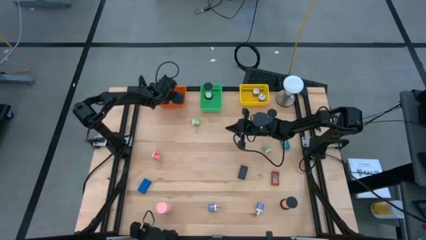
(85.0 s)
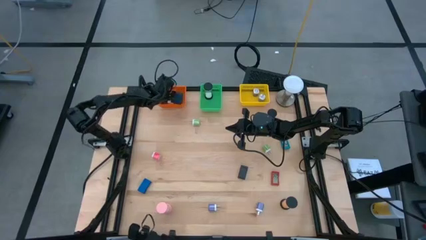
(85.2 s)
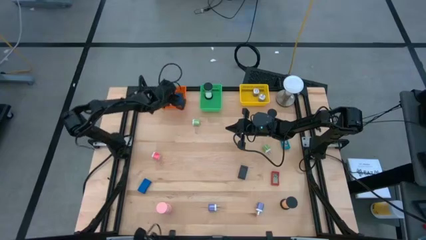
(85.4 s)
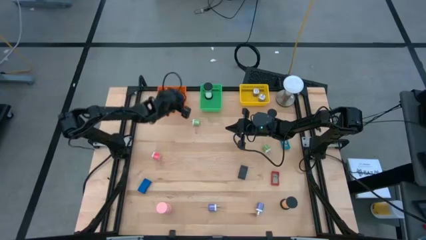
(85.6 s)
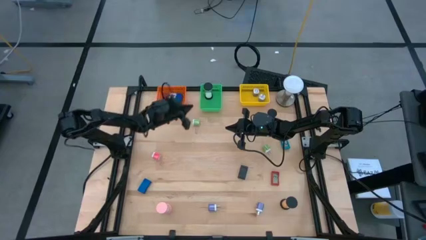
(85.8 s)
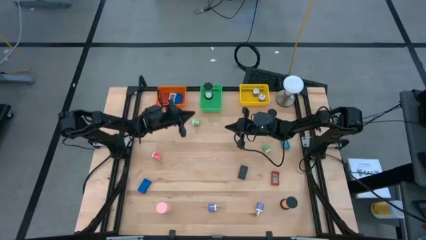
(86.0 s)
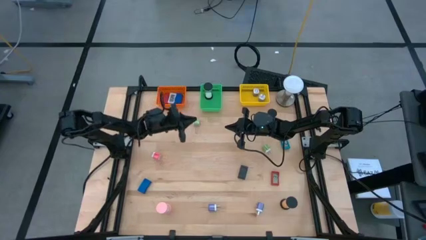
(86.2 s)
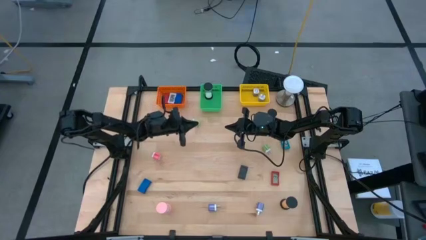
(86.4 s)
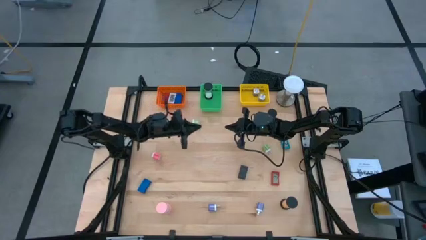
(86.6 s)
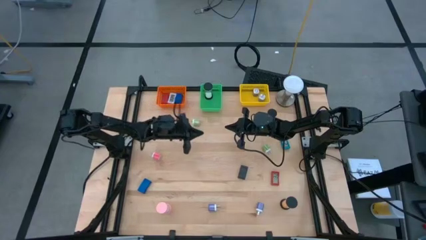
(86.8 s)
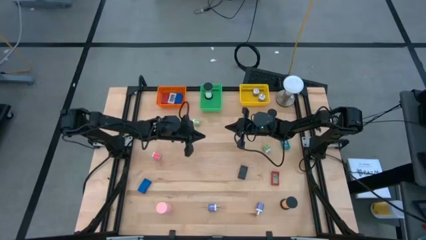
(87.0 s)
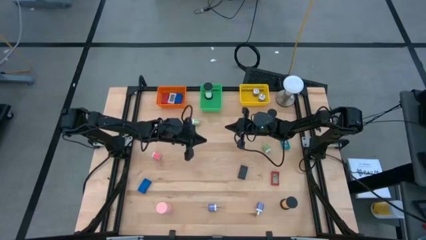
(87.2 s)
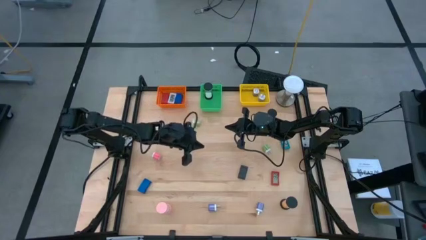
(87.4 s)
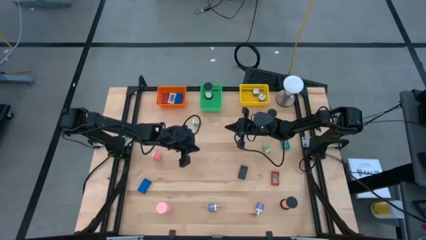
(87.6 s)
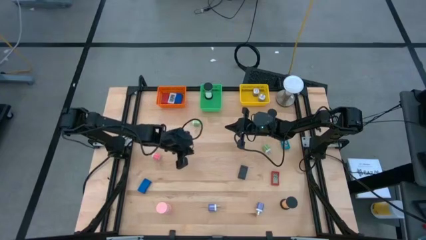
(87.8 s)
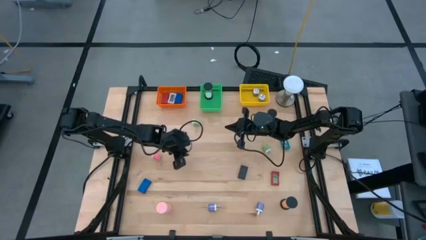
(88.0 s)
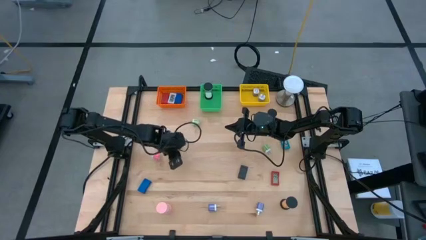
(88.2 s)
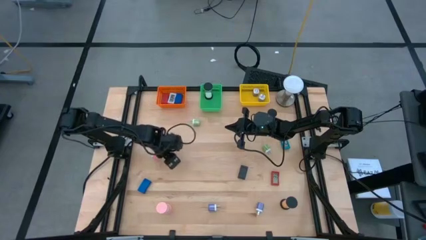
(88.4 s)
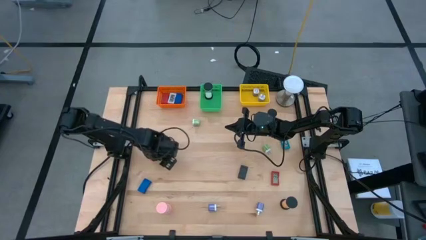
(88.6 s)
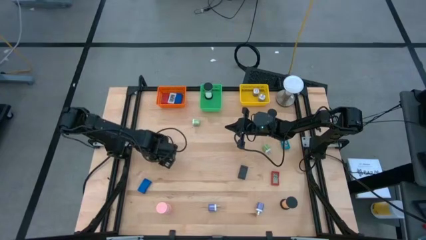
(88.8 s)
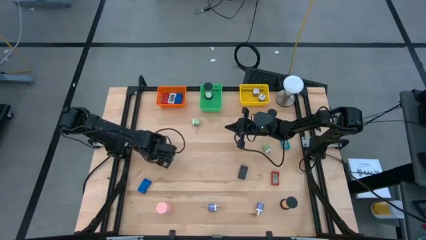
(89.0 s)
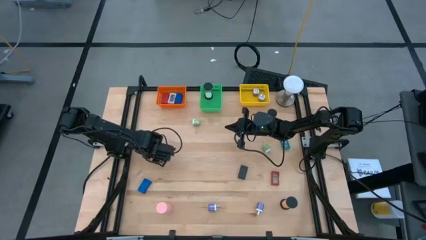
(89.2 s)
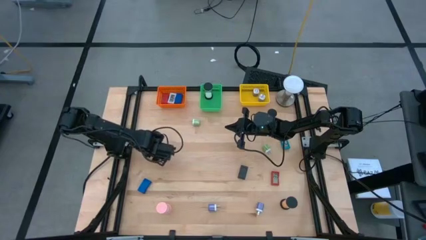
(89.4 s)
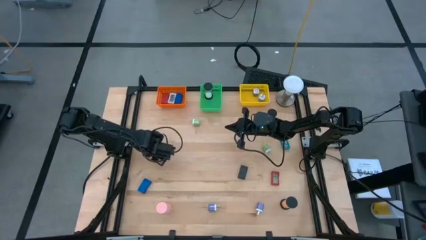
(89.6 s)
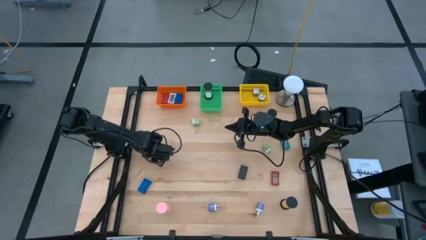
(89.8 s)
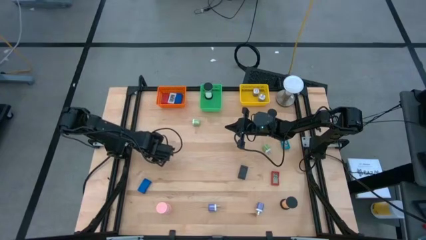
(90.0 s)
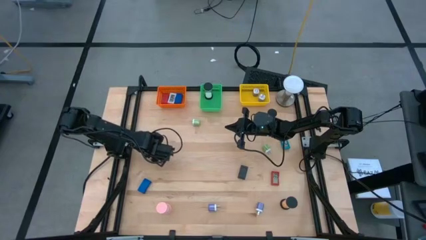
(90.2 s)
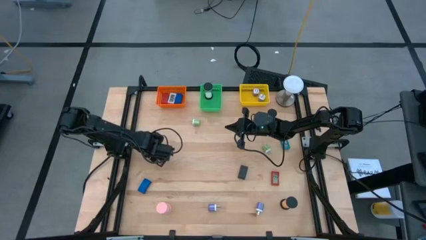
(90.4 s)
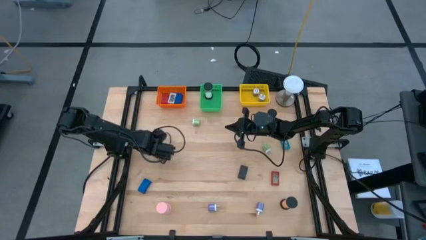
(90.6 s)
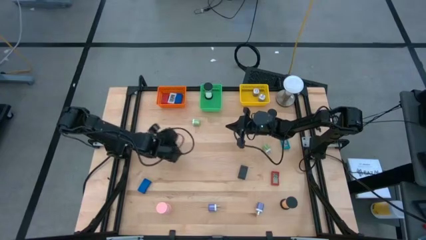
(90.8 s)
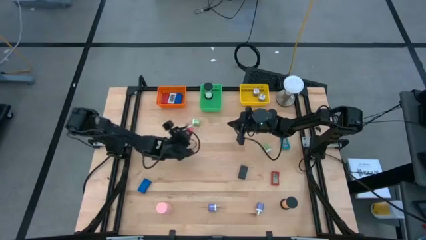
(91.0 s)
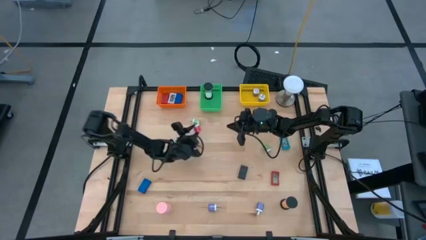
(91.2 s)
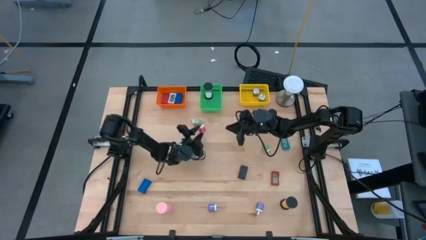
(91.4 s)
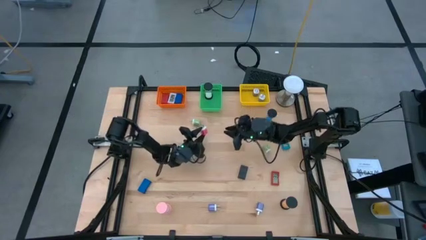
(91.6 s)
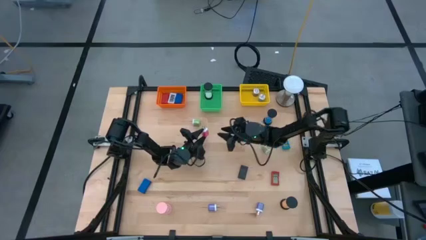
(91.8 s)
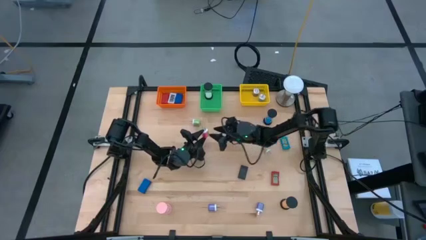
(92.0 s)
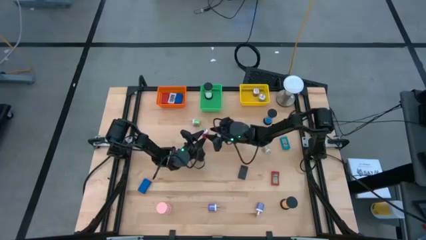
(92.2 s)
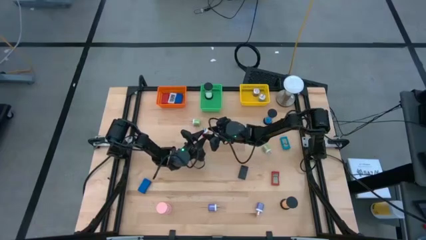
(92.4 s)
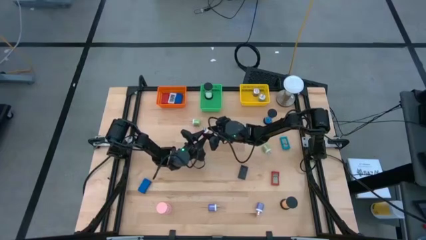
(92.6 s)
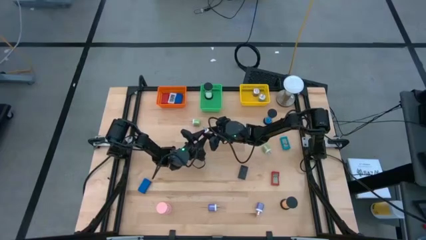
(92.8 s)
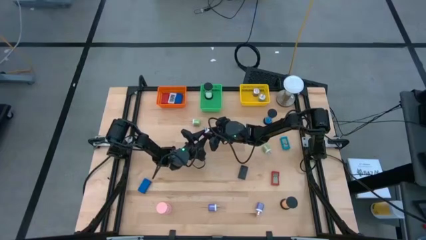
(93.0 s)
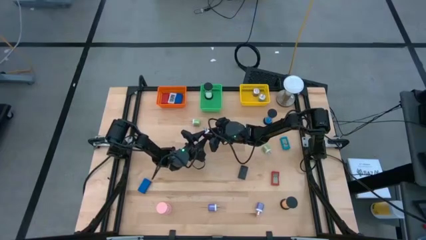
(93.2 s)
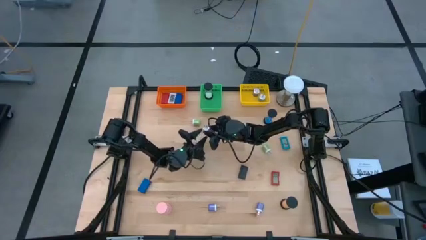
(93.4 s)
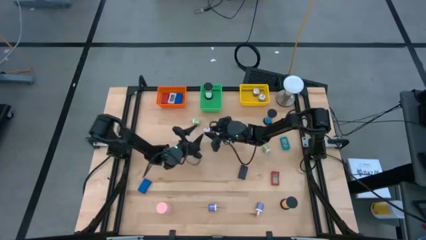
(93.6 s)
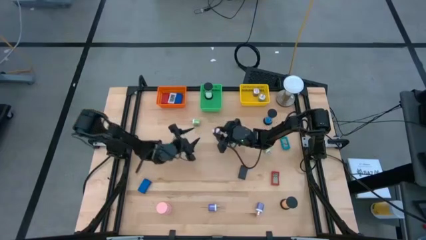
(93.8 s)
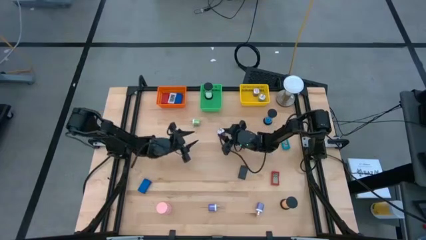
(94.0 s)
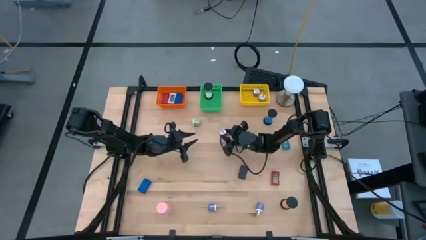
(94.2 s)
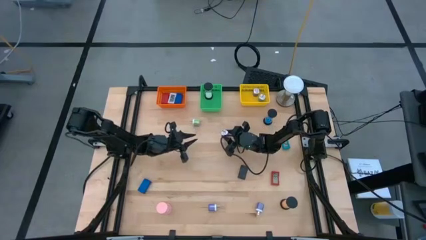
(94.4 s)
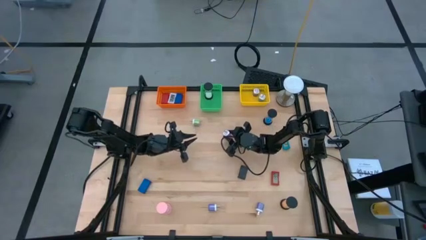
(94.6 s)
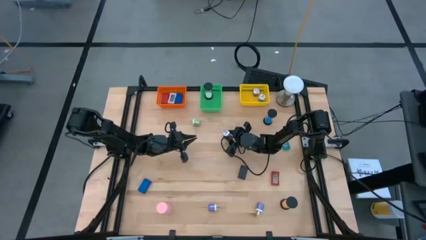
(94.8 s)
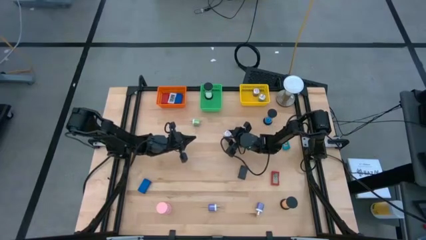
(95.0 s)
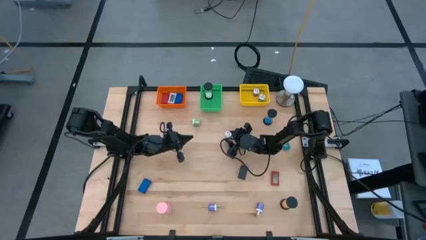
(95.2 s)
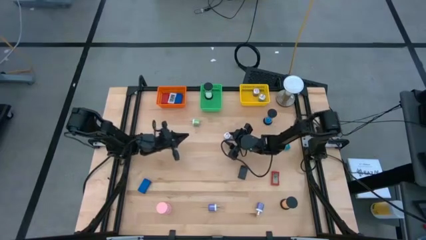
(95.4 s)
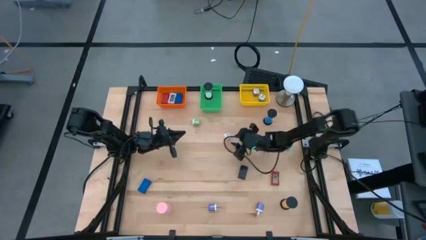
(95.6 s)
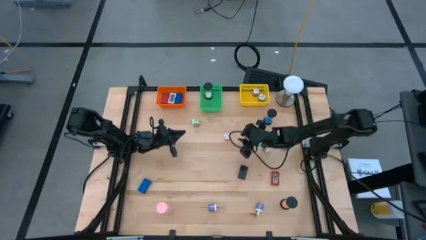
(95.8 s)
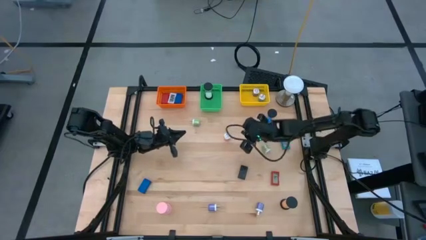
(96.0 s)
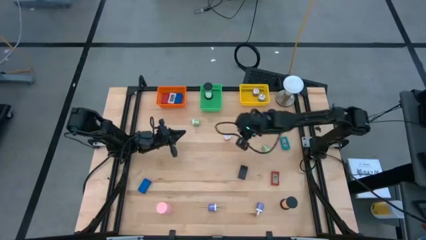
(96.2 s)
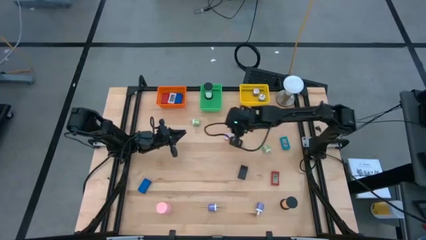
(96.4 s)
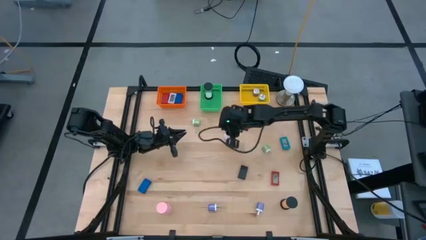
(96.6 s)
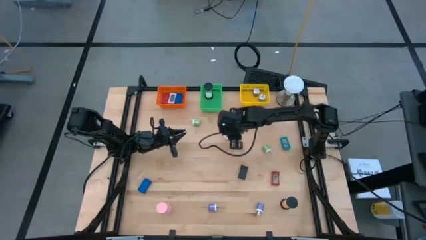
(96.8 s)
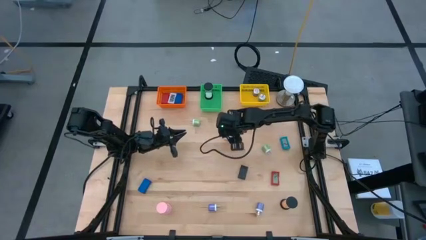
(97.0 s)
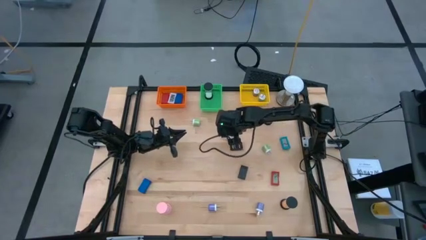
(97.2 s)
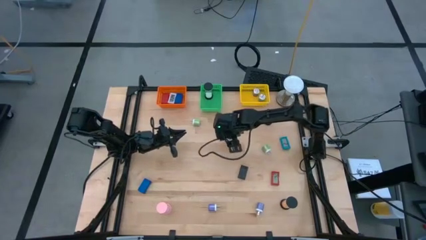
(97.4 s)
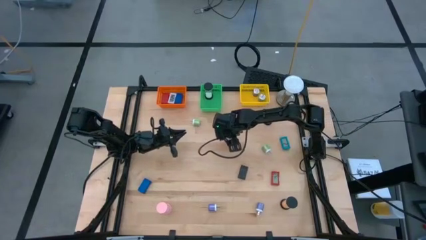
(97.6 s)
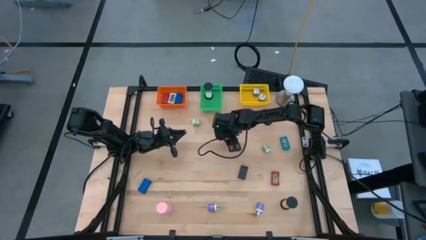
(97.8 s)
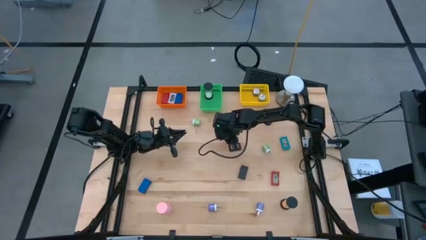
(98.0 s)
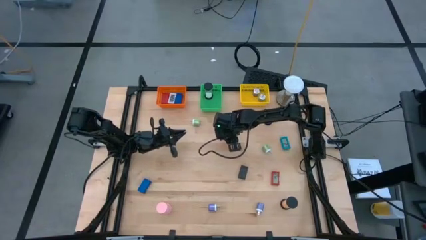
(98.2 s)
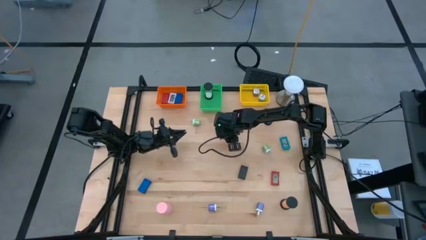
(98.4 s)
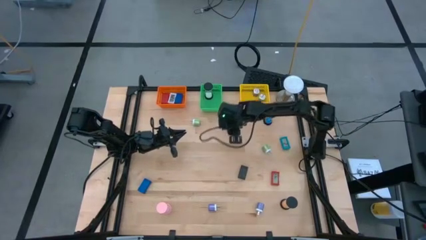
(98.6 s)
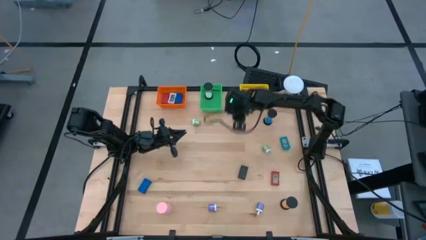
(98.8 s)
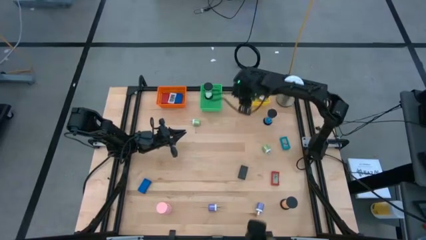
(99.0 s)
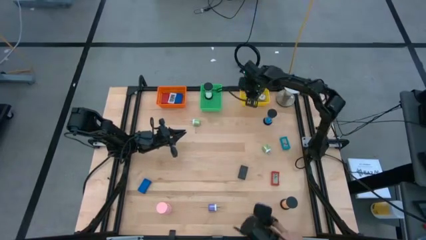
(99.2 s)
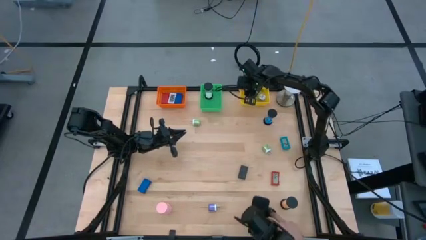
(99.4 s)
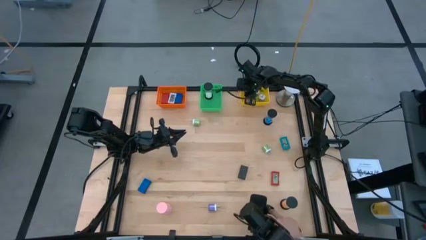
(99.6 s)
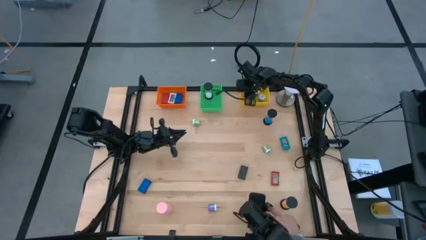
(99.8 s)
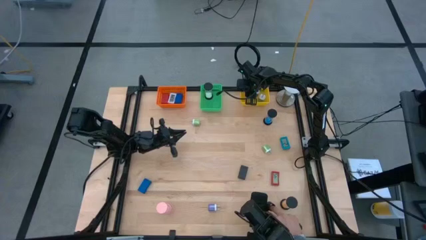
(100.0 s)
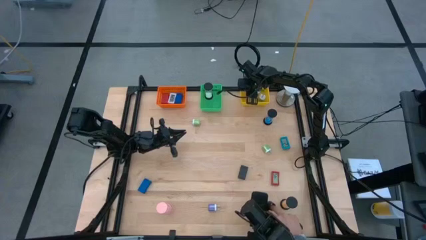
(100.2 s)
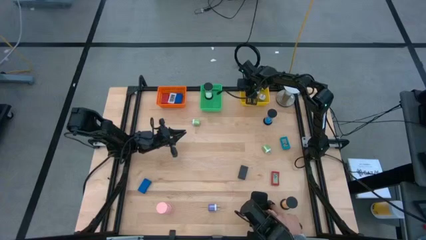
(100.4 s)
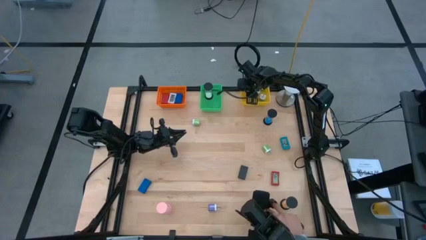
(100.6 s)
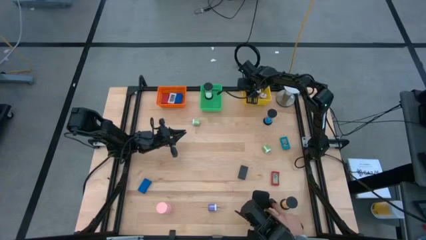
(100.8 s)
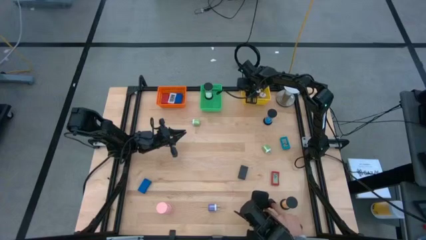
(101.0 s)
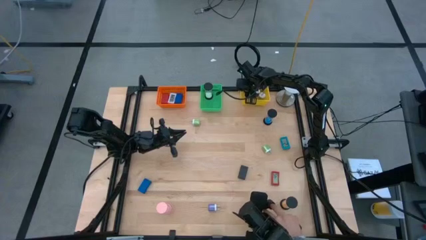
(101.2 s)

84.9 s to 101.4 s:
Task: Pick & Place Office items
Put the pink charger adapter into the yellow bin
